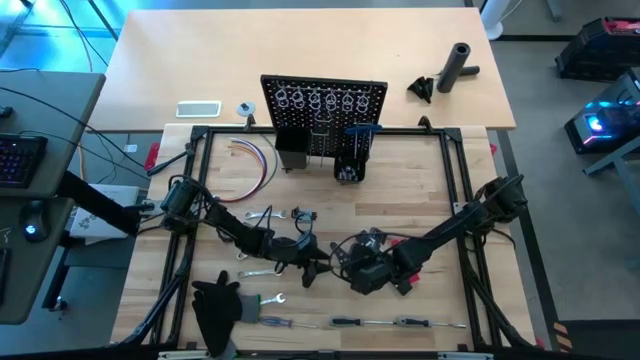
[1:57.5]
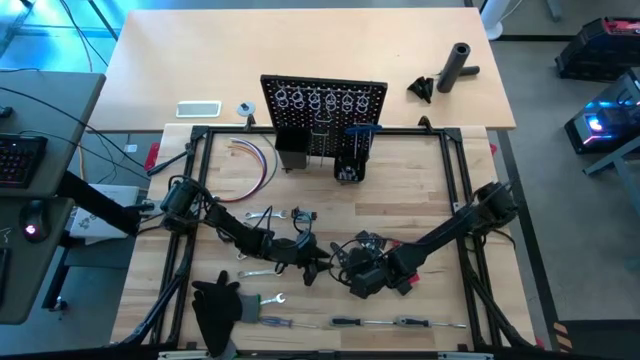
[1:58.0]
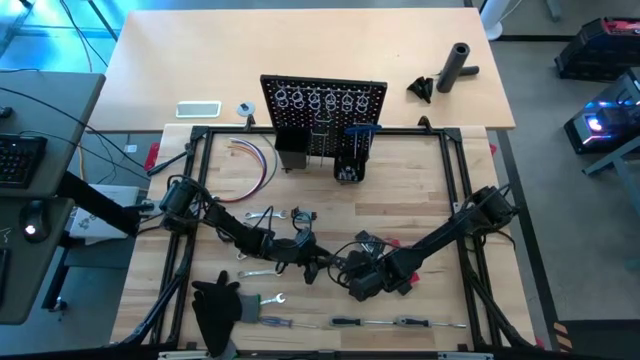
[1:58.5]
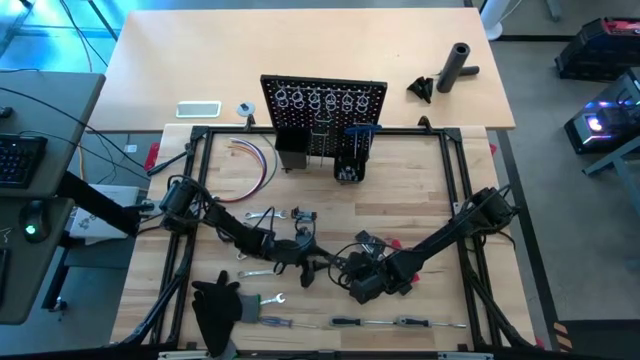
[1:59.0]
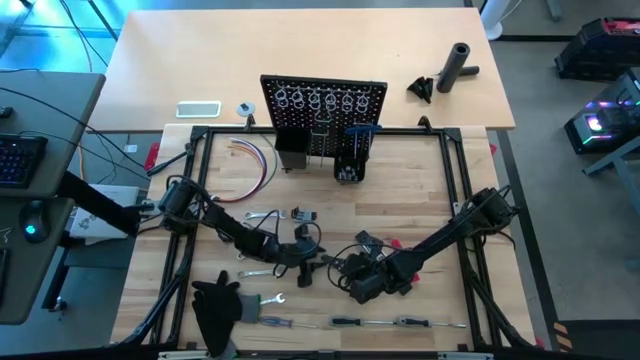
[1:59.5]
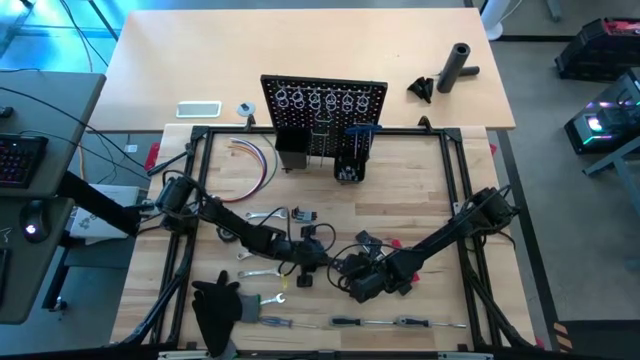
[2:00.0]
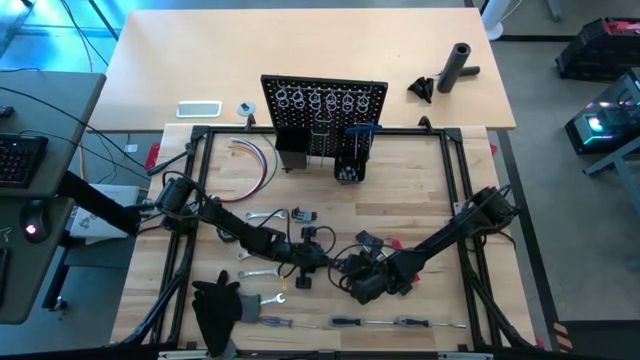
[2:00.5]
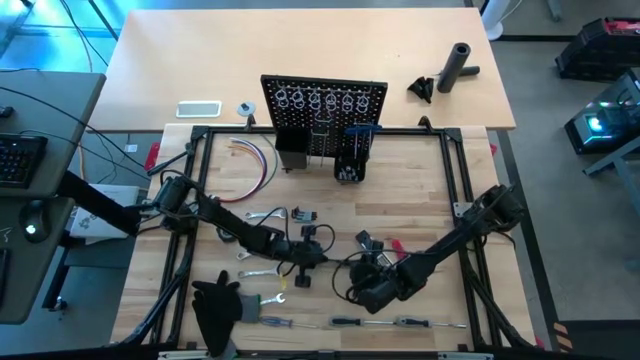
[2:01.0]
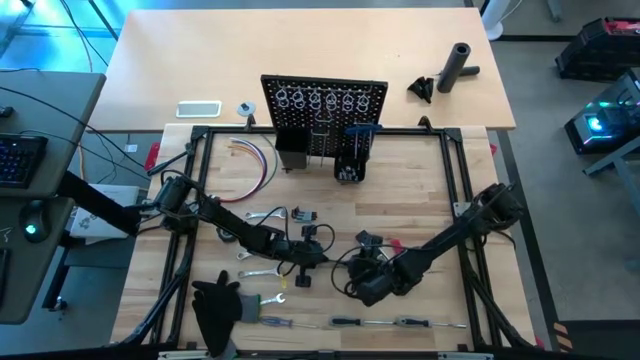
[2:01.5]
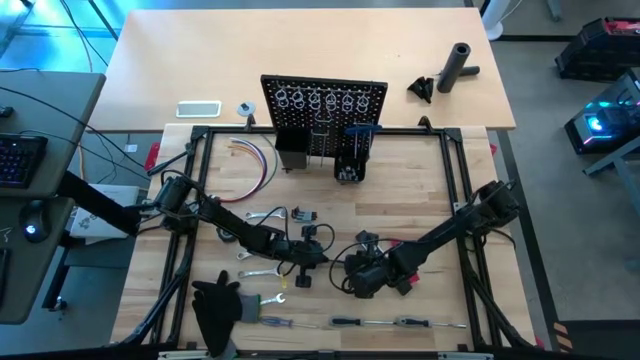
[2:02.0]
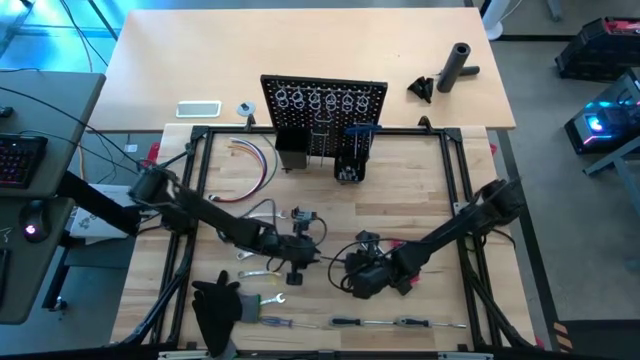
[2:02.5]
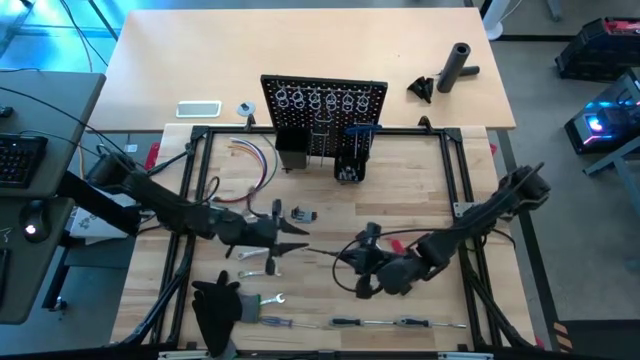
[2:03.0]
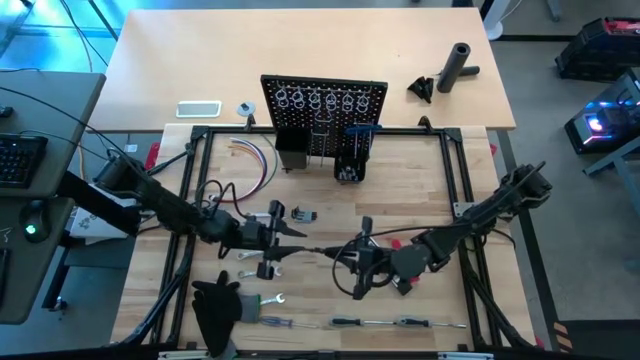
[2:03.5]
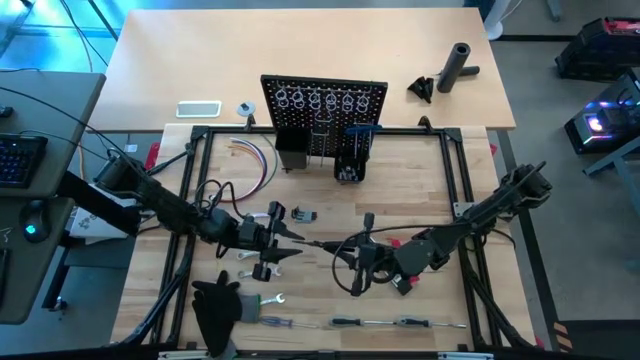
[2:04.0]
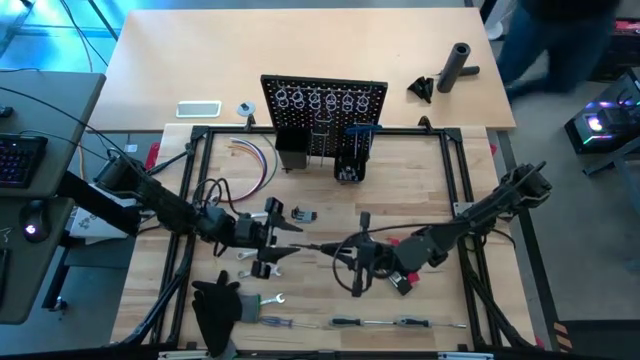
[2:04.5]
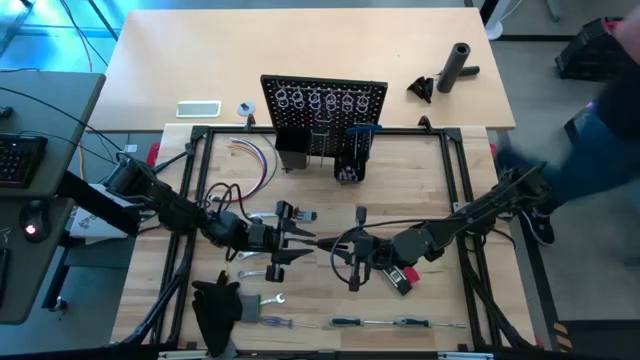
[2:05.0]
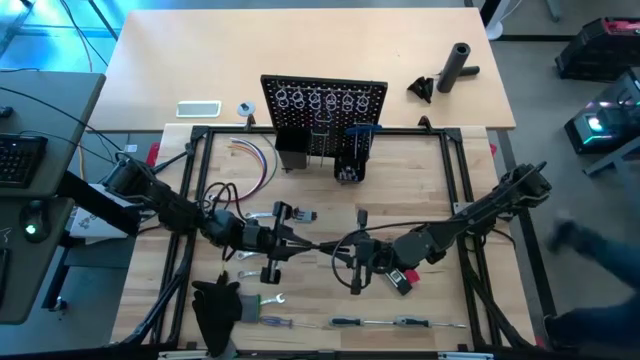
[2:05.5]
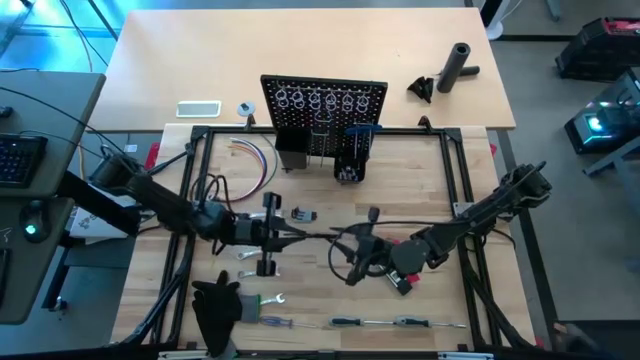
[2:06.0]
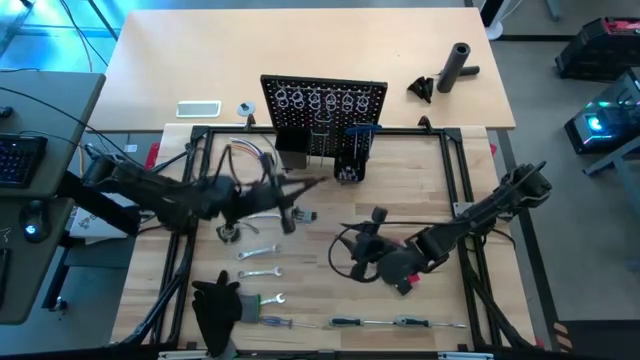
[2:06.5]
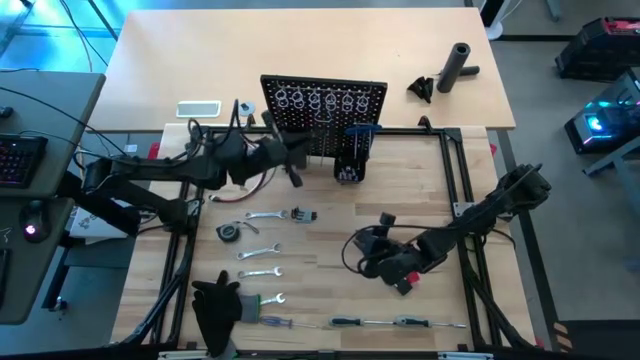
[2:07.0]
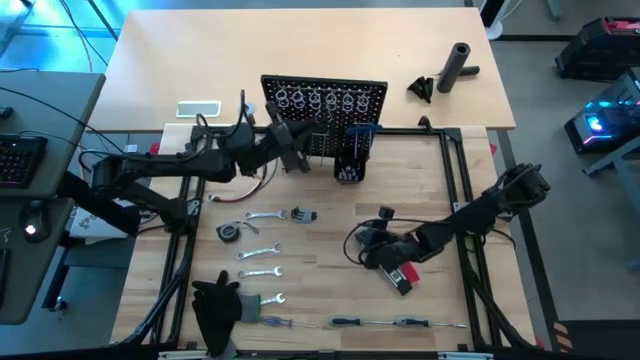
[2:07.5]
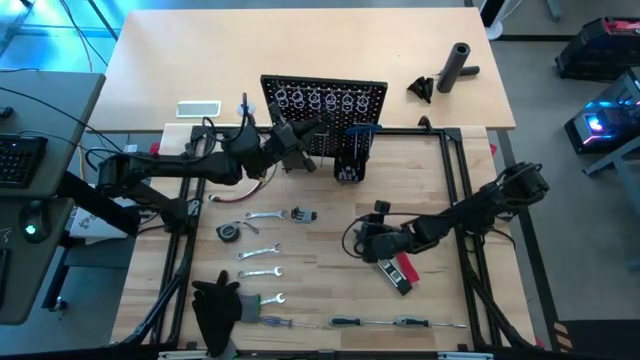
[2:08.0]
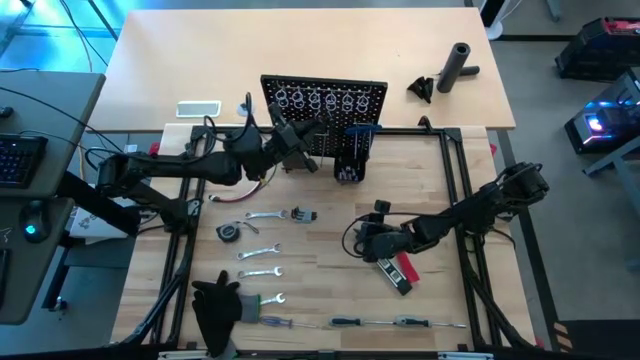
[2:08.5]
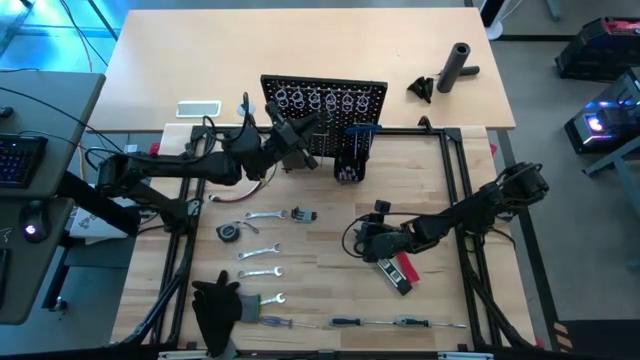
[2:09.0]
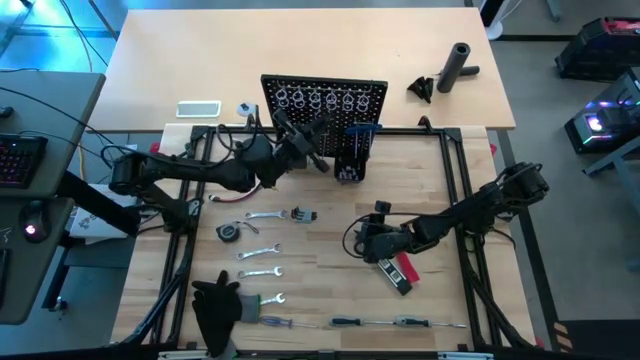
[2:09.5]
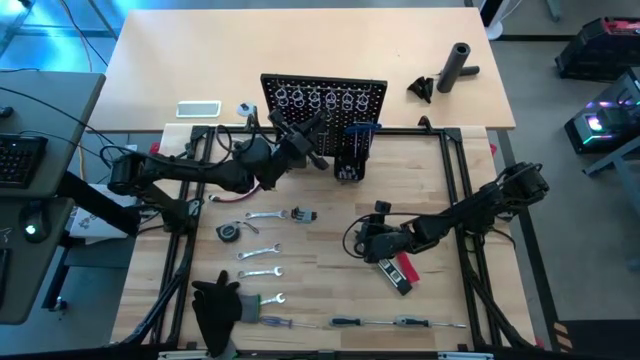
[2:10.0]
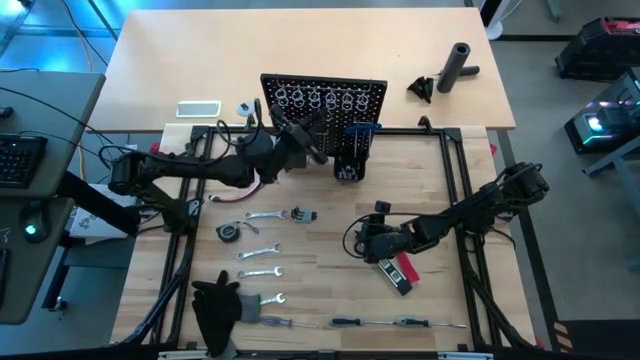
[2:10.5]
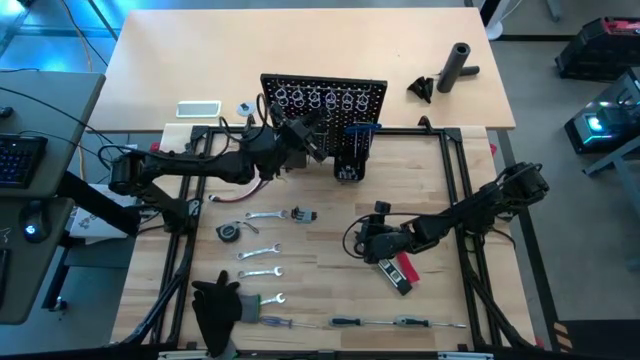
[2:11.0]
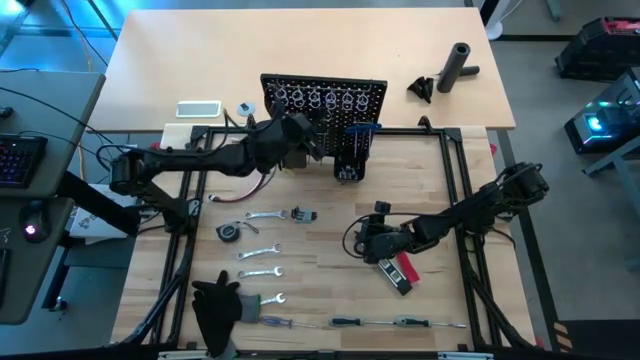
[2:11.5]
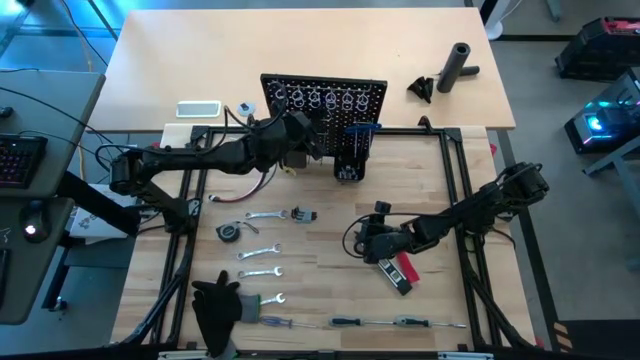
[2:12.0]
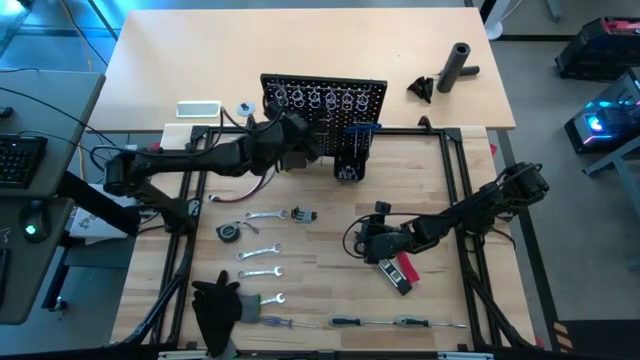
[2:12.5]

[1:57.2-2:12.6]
Task: Hang tools onto peg board
Hang the black wire stripper on the black pegboard

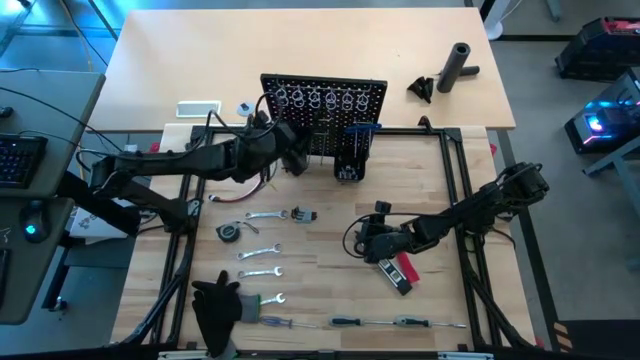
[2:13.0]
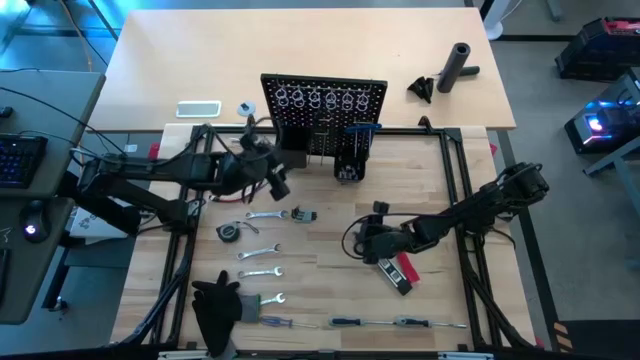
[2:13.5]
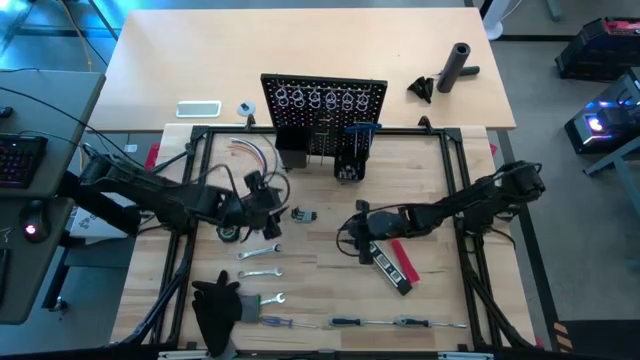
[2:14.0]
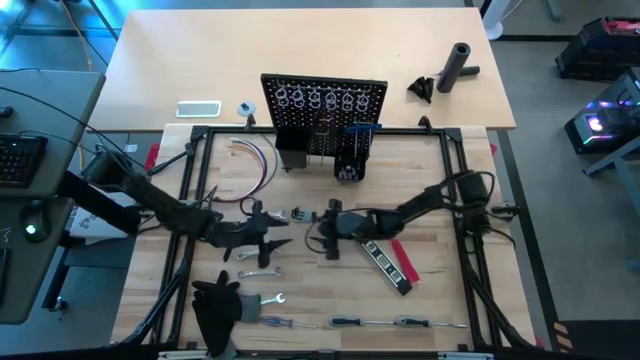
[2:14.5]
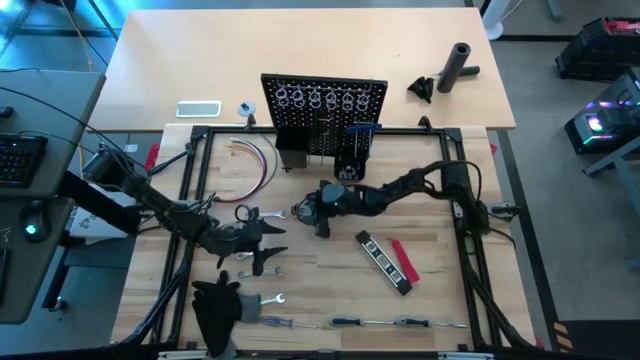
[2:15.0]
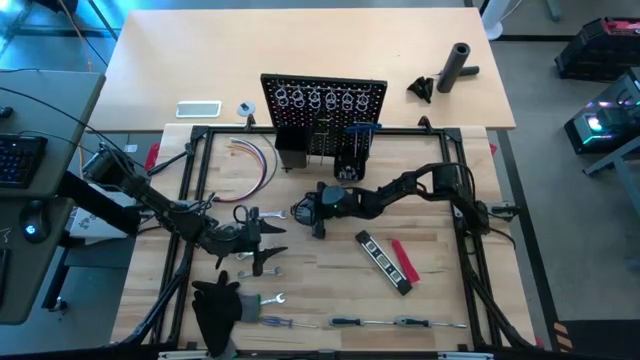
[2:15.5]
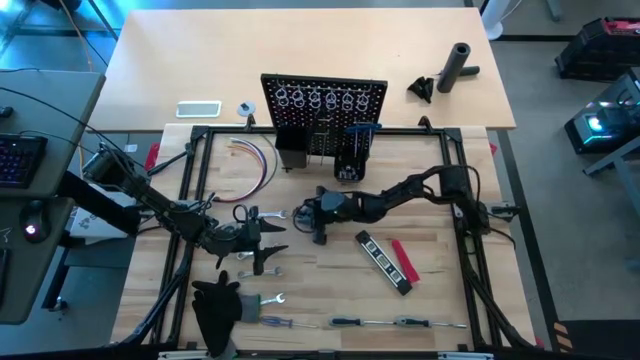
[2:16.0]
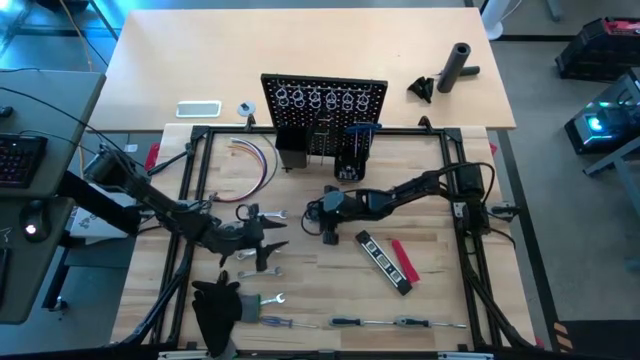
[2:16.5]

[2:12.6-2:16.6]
Put the allen key holder into the small black bin on the black pegboard
